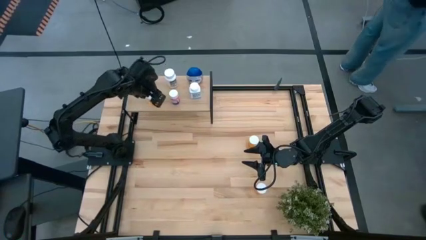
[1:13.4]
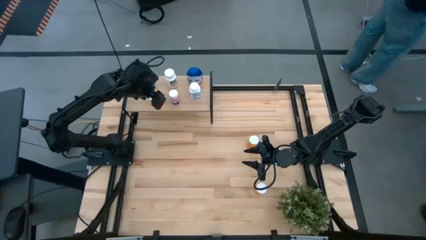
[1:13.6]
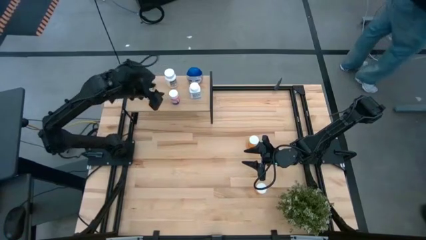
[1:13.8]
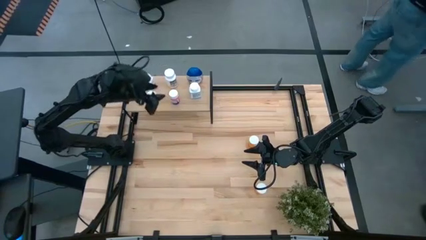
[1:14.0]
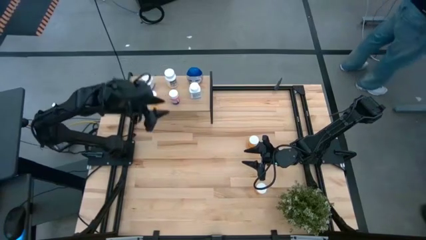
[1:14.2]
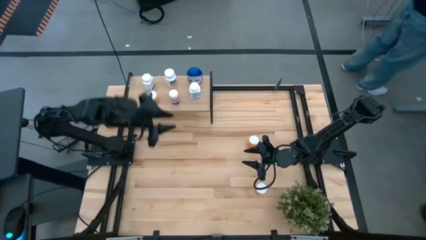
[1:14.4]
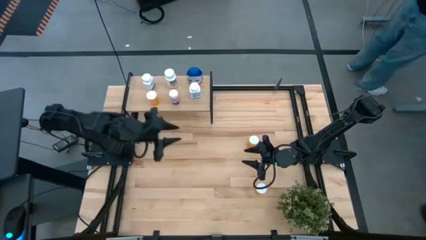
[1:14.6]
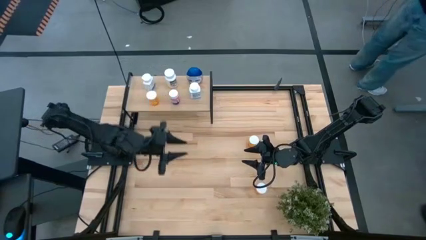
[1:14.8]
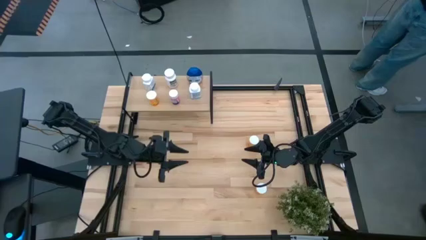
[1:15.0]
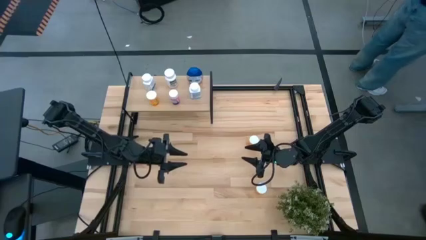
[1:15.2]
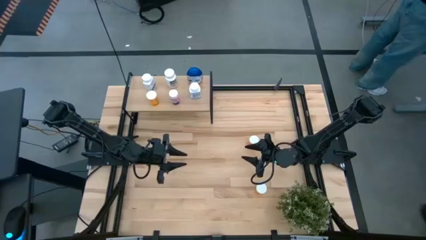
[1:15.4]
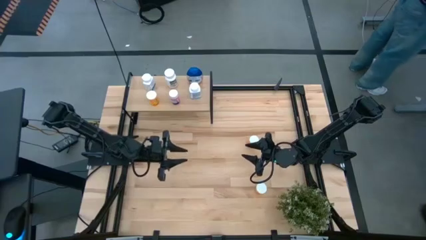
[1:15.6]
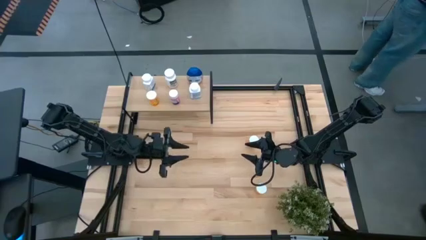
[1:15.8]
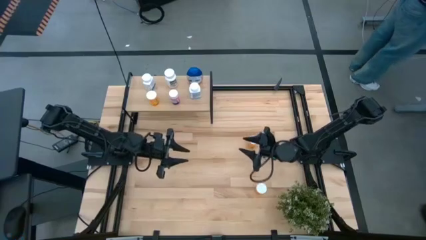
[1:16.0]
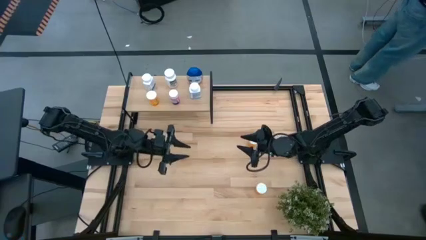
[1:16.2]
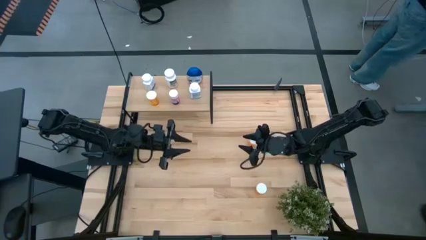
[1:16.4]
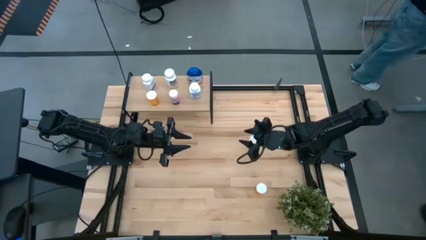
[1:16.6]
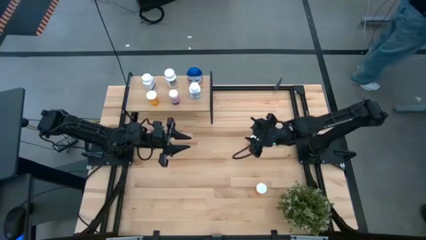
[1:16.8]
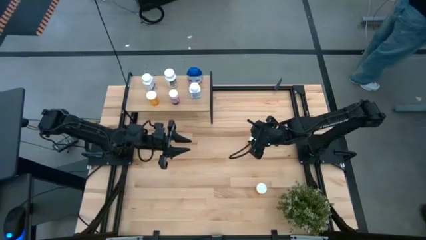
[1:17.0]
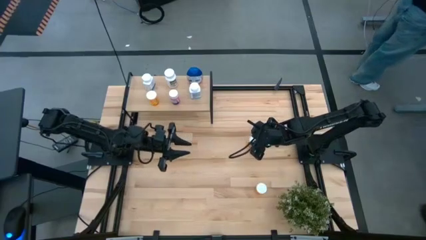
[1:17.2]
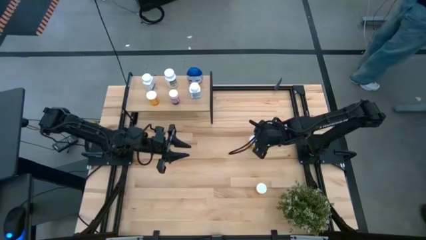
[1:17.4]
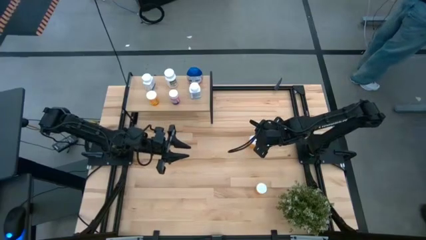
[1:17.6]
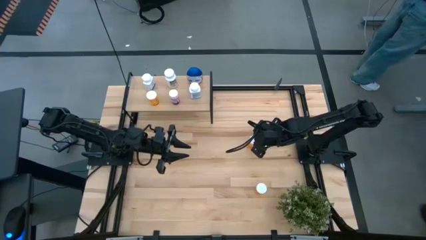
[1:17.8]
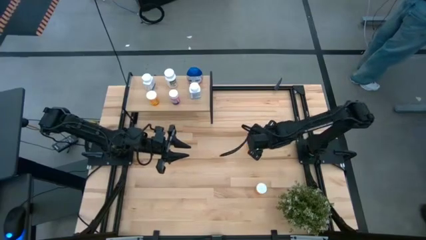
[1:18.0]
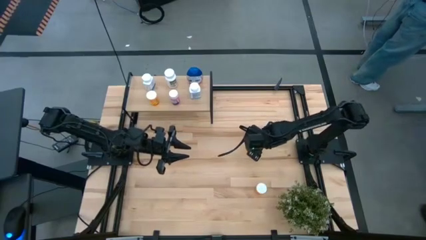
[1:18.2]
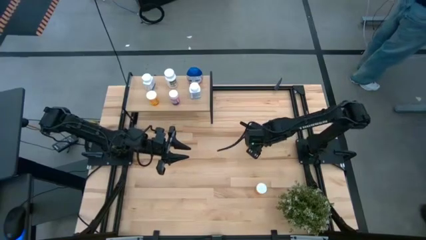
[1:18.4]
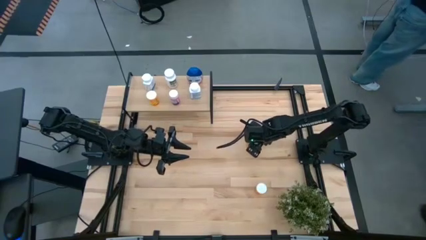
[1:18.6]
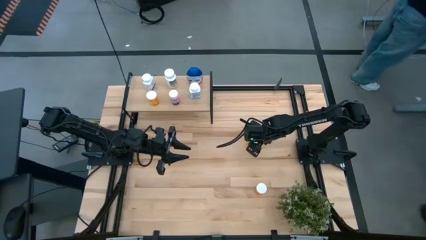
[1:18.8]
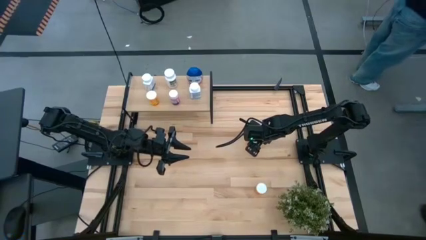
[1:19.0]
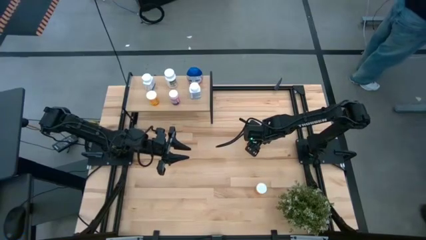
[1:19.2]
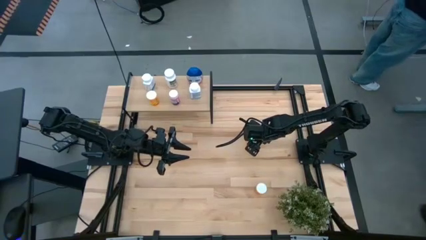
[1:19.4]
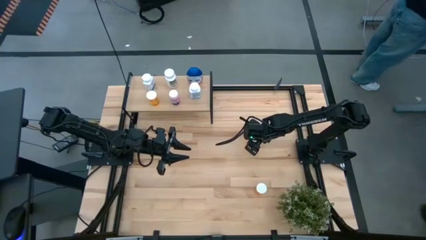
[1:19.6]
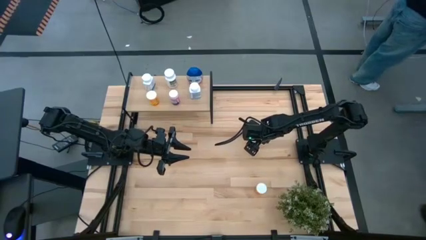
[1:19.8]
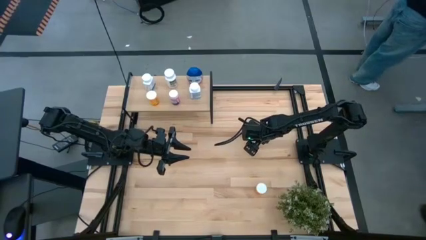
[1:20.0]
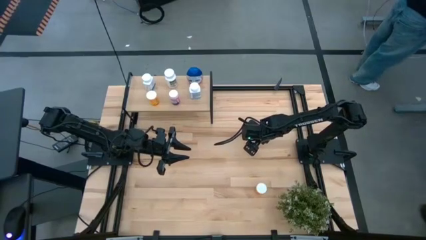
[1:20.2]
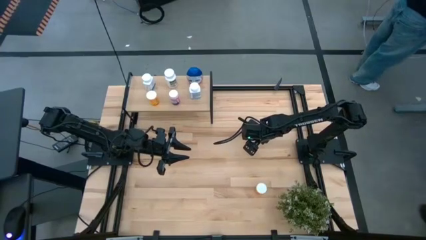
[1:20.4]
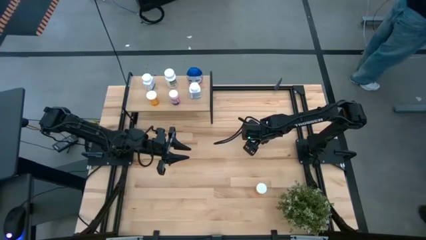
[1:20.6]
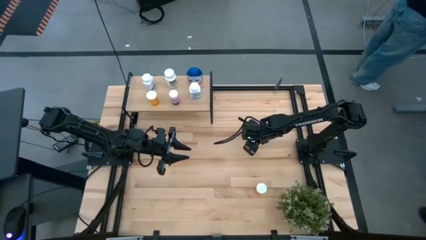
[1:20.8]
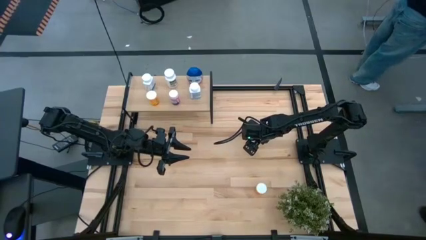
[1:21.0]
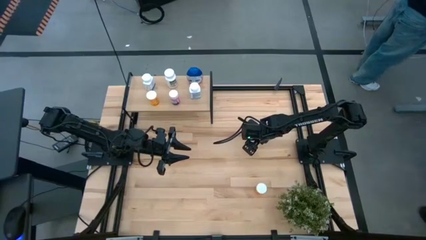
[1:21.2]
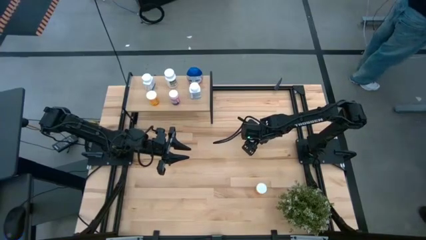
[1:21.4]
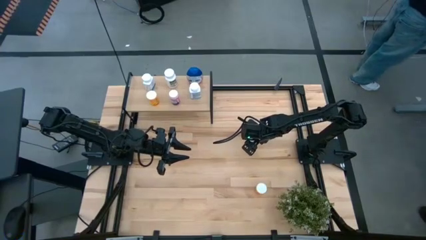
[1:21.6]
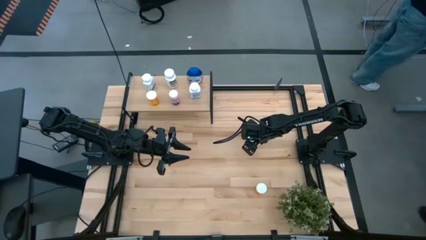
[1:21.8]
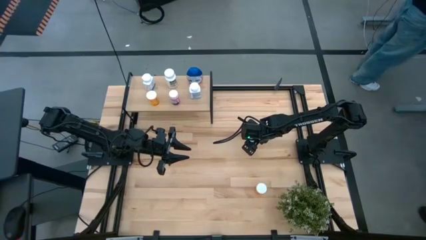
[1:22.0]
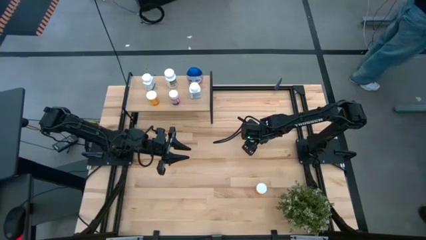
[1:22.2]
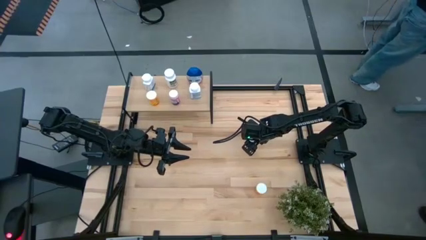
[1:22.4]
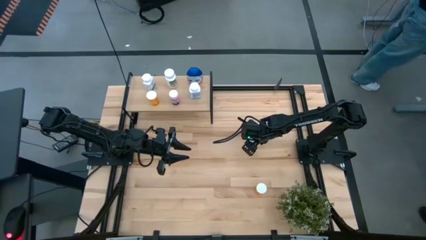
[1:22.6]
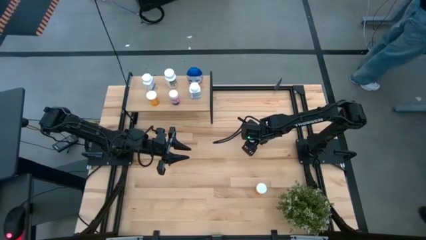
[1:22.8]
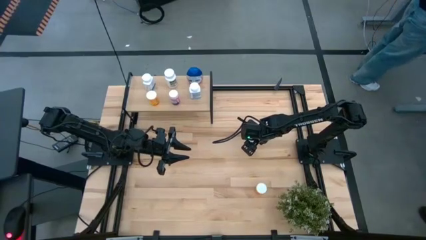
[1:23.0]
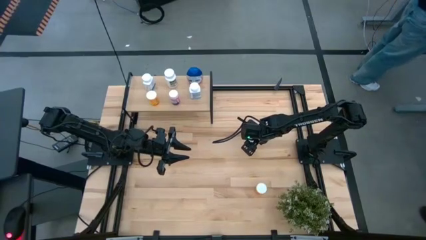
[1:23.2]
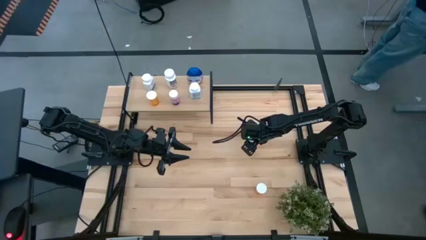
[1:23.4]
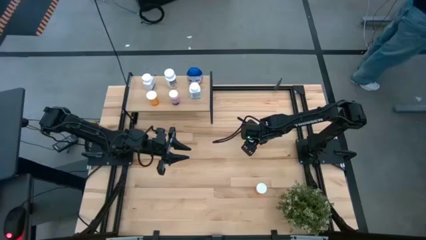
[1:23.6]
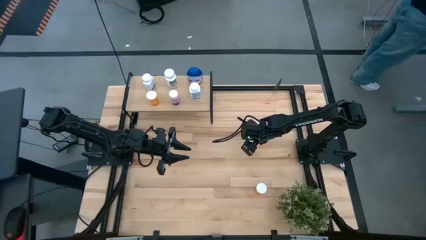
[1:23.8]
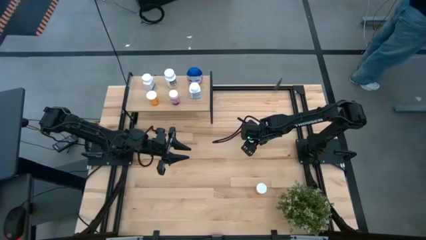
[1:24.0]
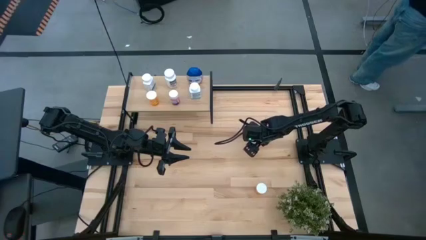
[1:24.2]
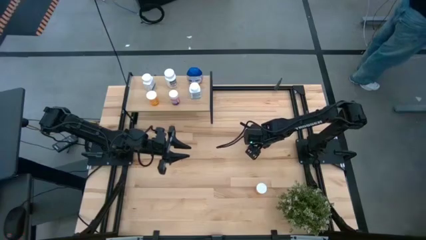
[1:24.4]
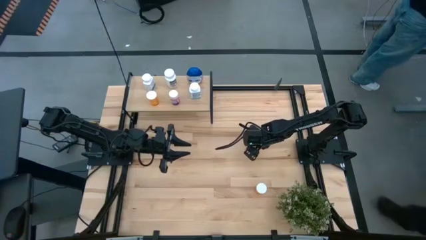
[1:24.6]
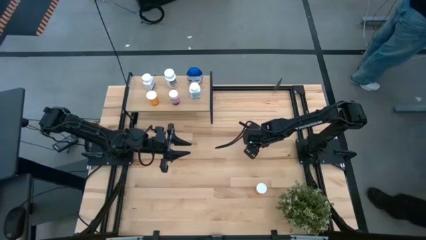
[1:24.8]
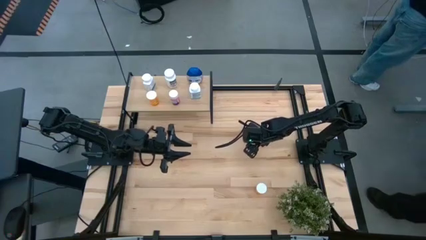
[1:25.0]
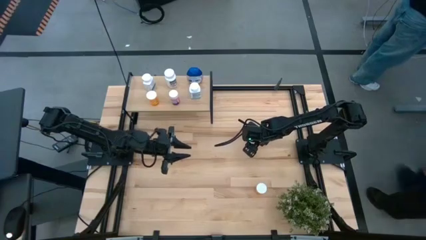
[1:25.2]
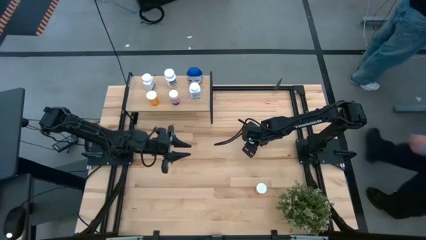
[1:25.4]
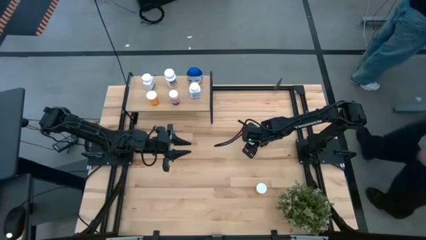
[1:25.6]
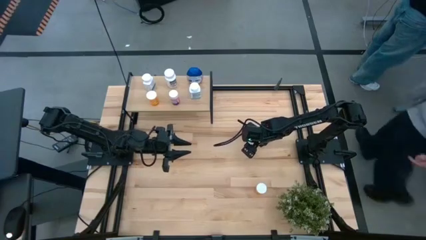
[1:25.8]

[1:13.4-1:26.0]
Task: Pick and place medicine bottles onto shelf by color
Put the top orange pill bottle on the shelf

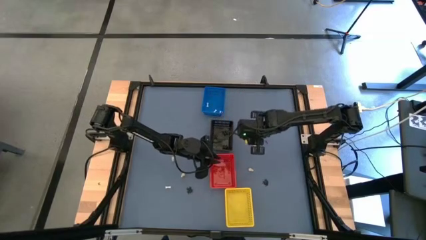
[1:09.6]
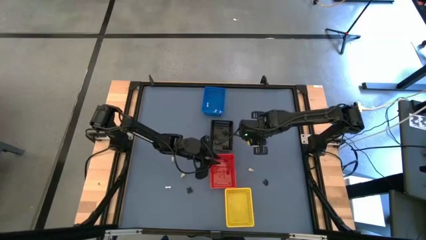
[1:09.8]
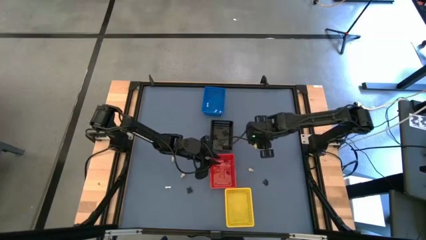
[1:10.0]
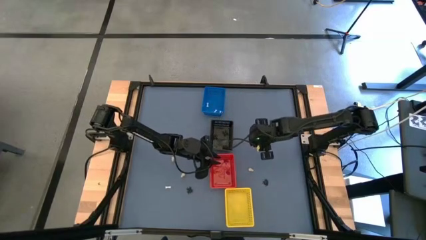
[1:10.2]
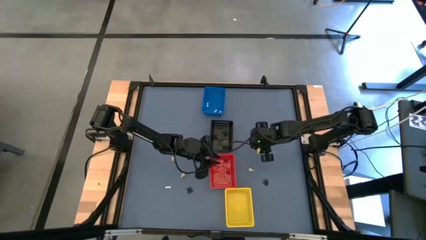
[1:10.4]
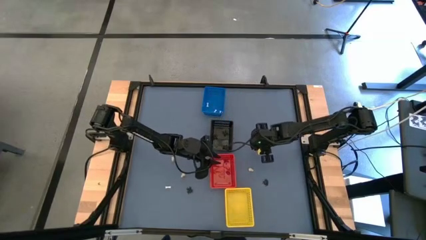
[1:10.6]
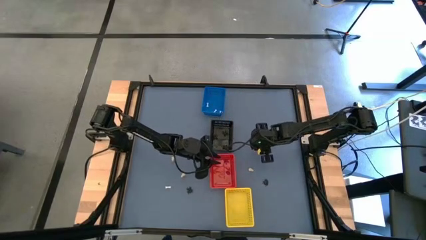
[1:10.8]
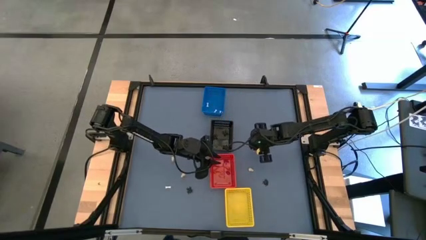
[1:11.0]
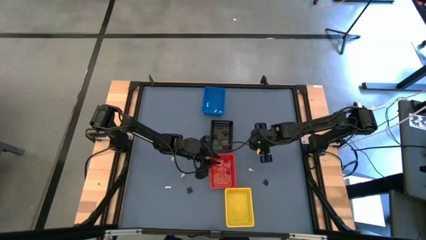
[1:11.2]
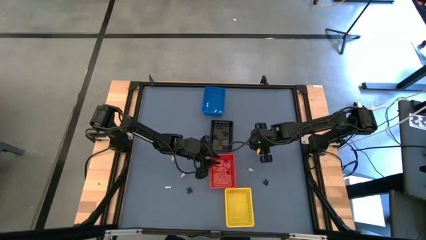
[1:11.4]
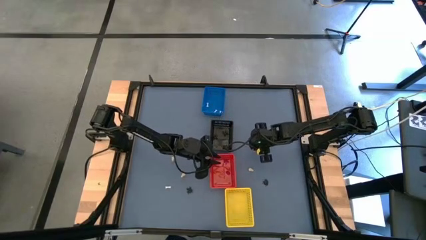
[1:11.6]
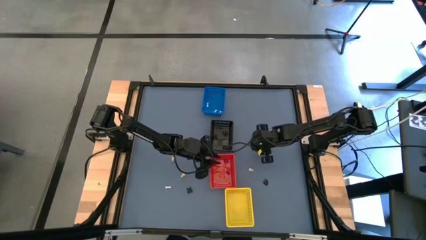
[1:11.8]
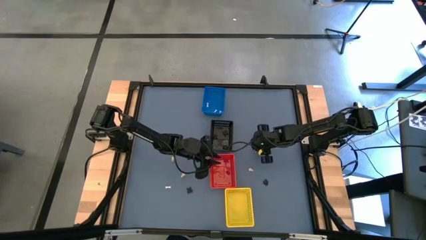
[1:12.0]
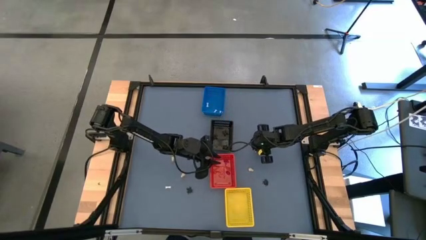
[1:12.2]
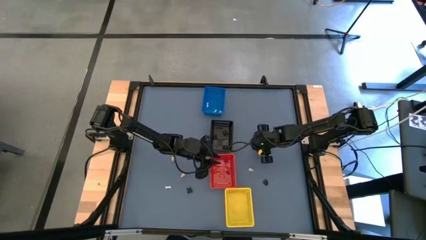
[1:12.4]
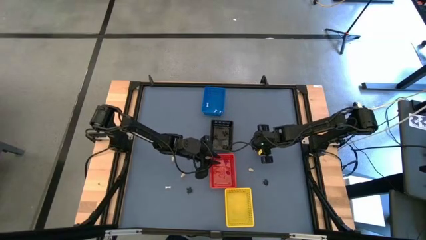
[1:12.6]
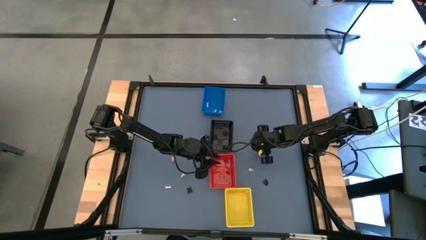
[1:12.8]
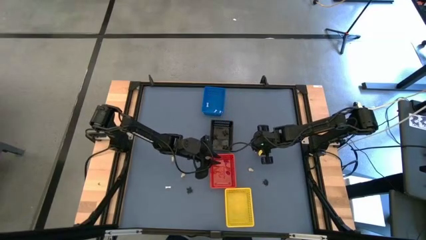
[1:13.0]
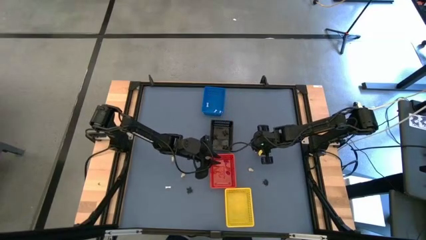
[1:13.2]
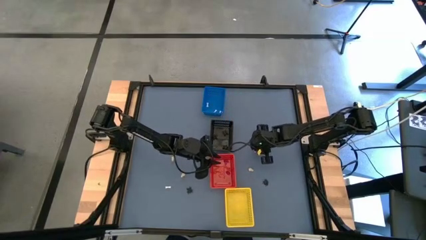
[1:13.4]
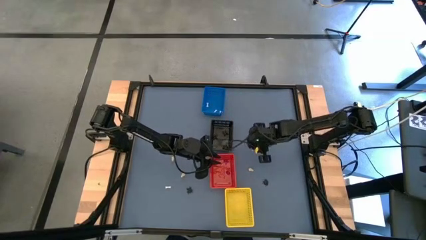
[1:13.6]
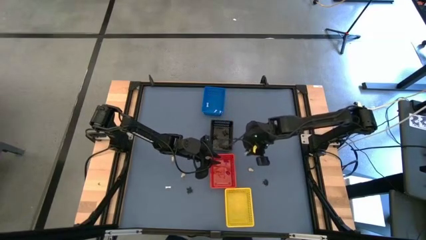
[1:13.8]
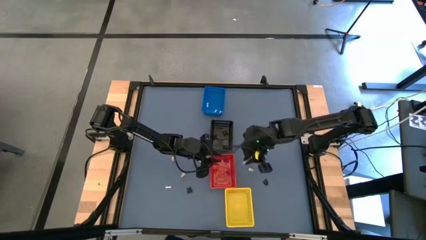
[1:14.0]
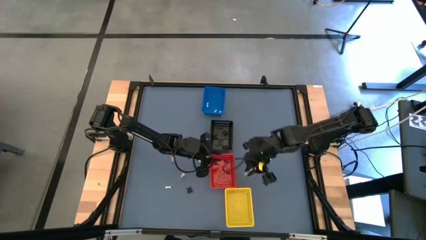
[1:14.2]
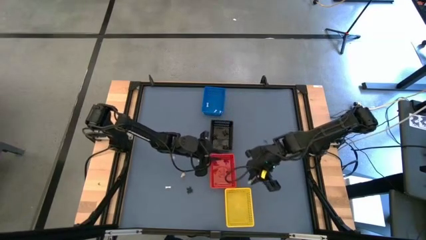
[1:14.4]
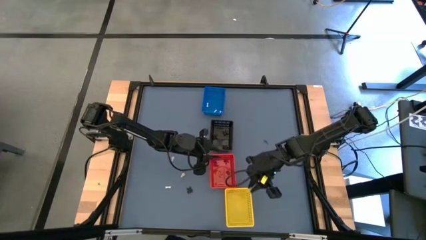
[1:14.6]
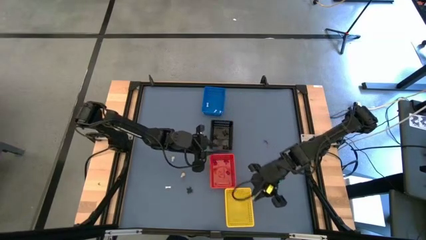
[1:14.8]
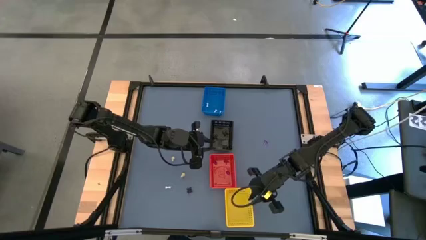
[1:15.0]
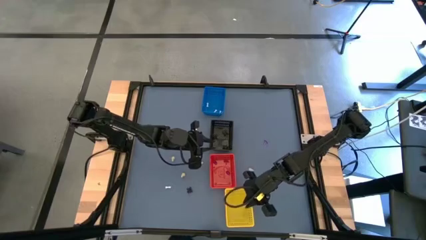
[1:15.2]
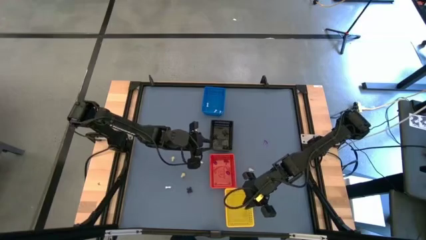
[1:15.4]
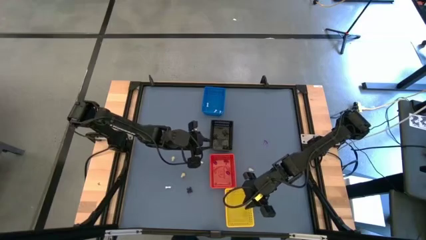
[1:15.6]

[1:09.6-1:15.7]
Task: Sort Halloween decoration
Put the brown skull toy into the yellow bin
